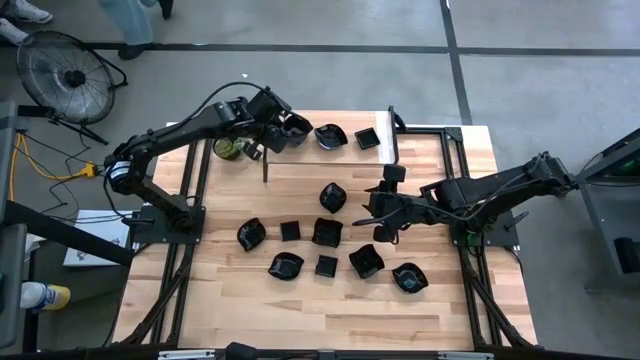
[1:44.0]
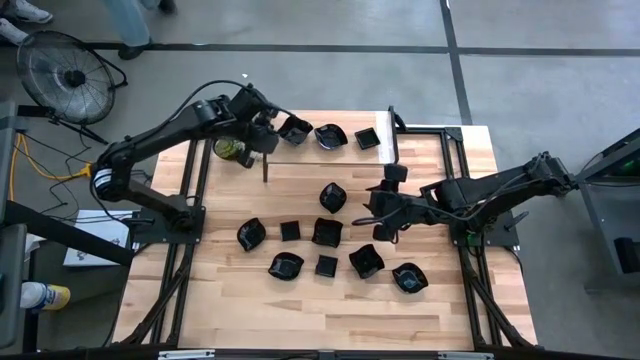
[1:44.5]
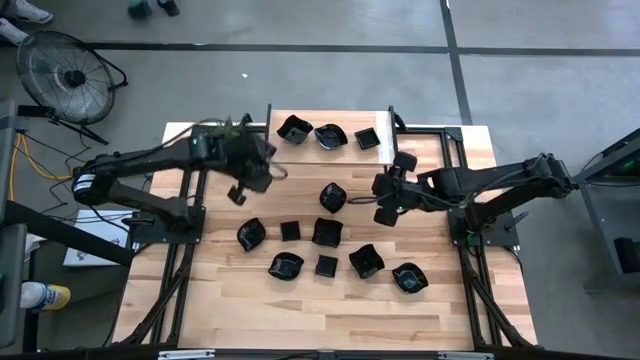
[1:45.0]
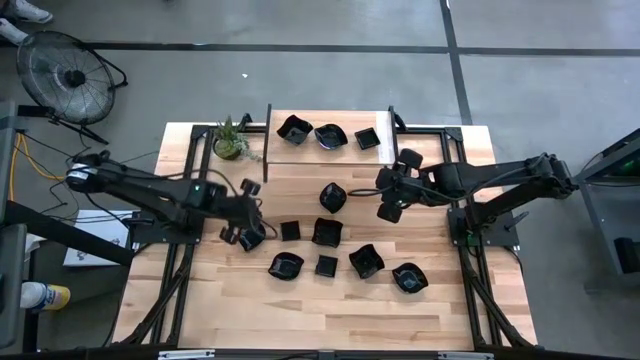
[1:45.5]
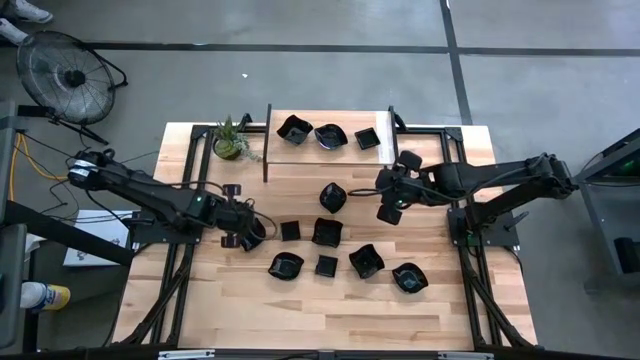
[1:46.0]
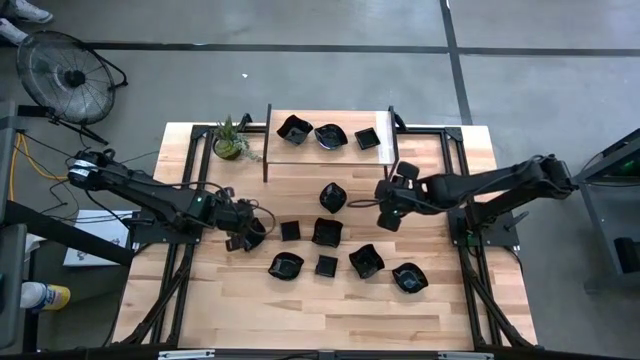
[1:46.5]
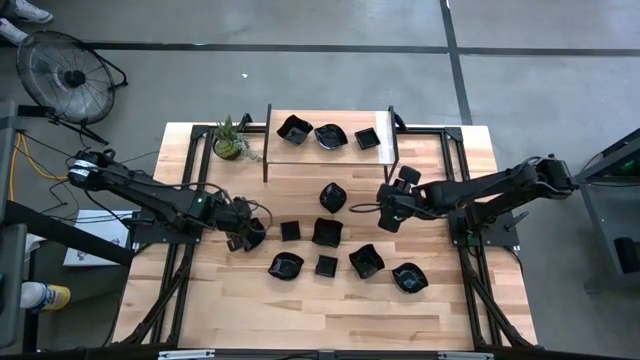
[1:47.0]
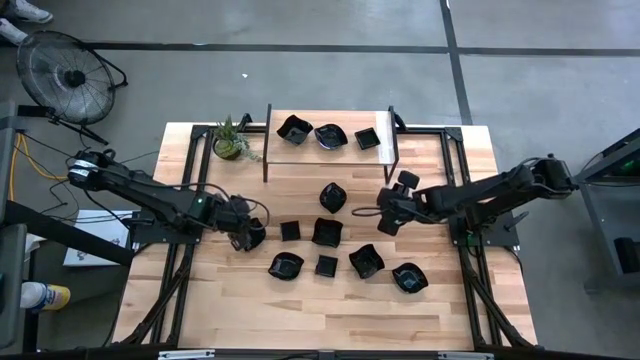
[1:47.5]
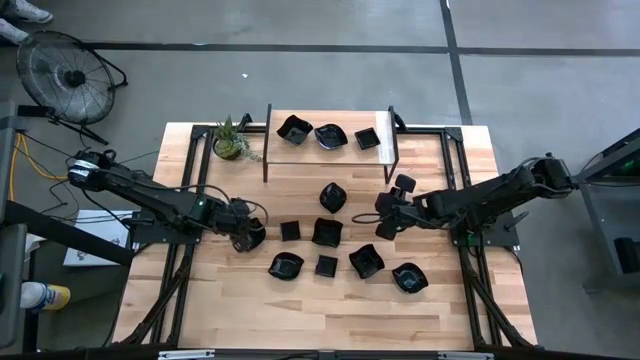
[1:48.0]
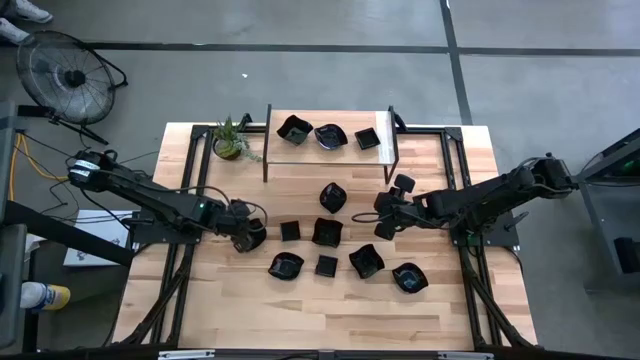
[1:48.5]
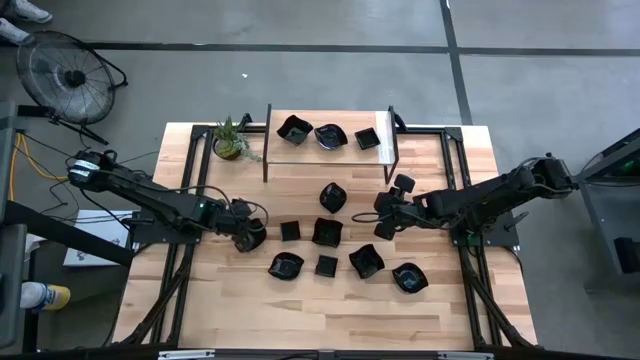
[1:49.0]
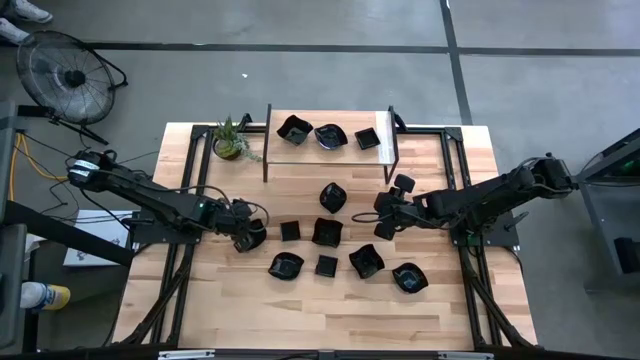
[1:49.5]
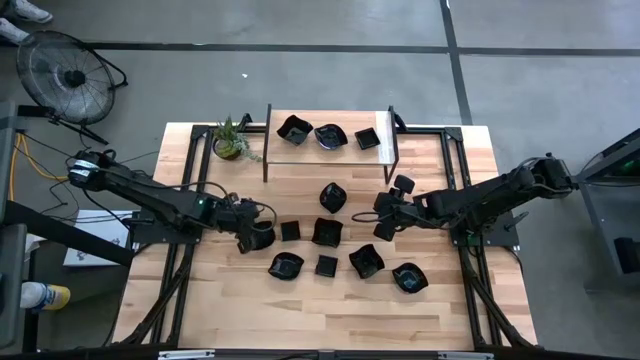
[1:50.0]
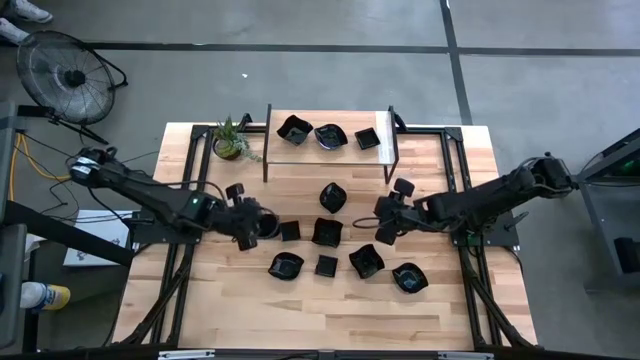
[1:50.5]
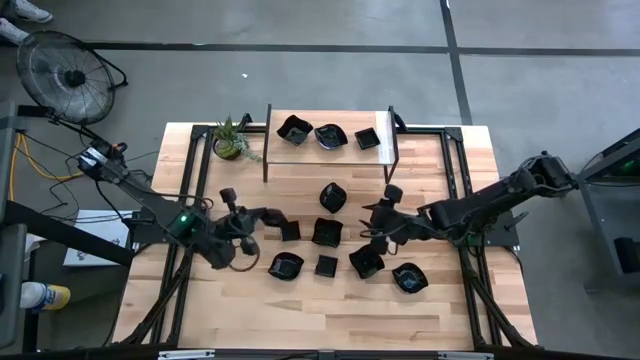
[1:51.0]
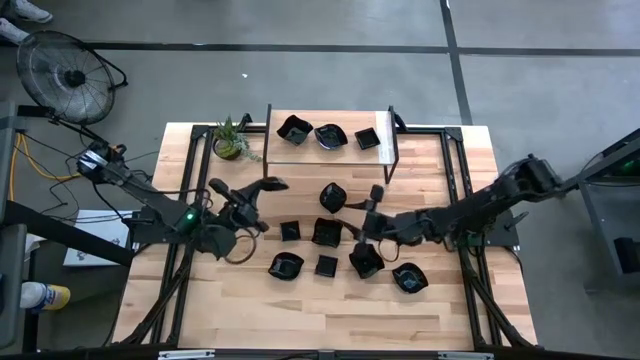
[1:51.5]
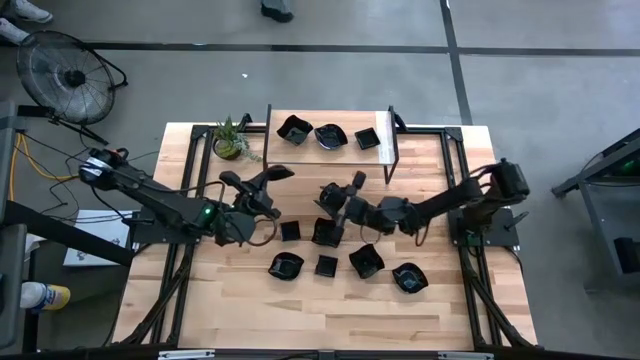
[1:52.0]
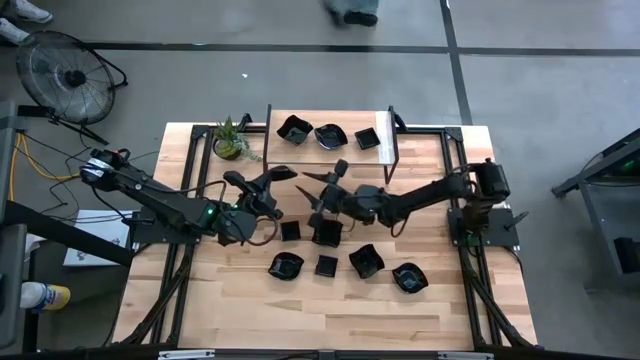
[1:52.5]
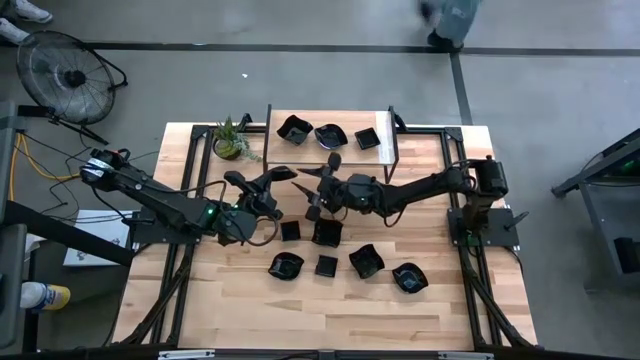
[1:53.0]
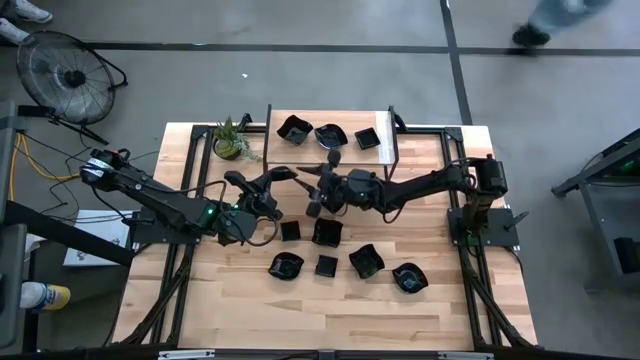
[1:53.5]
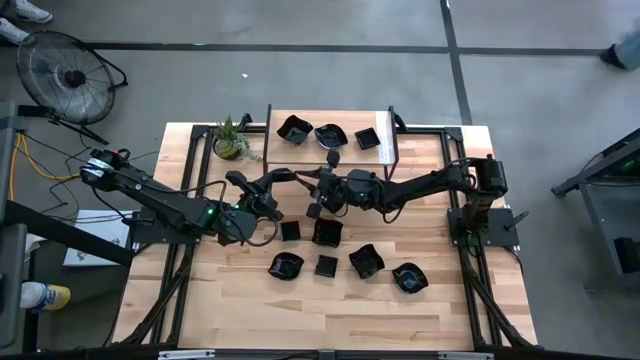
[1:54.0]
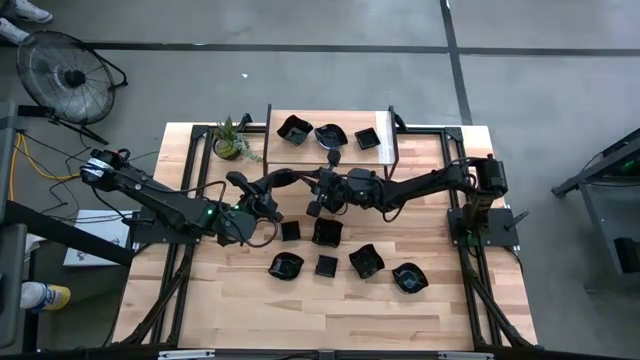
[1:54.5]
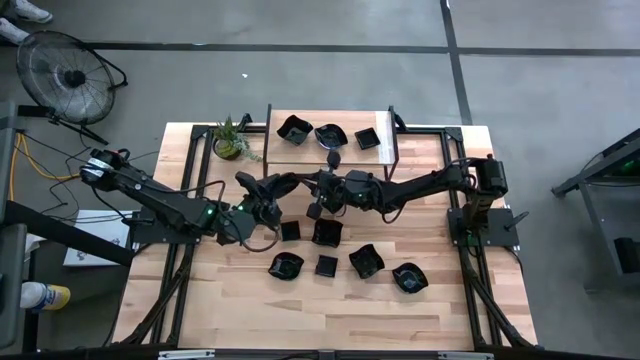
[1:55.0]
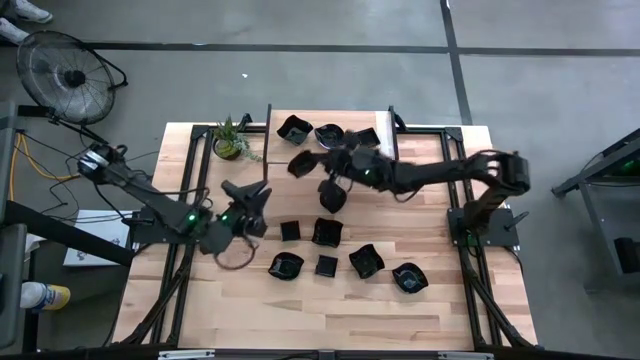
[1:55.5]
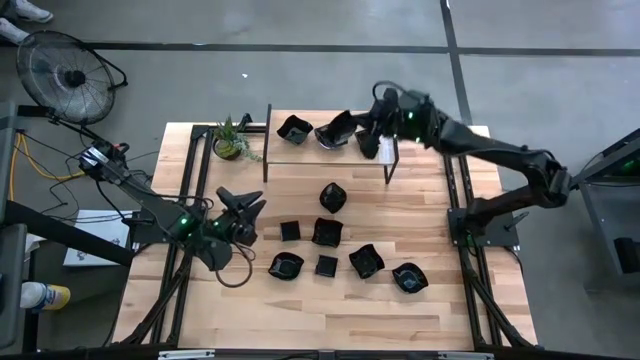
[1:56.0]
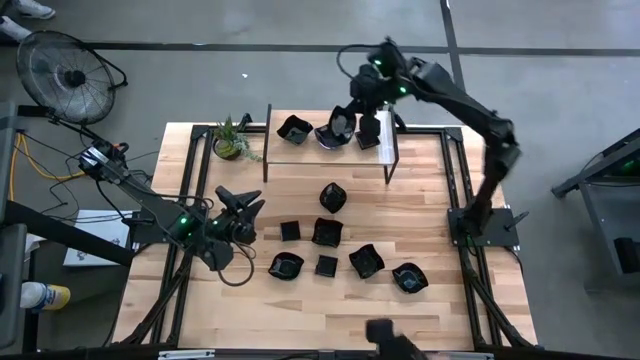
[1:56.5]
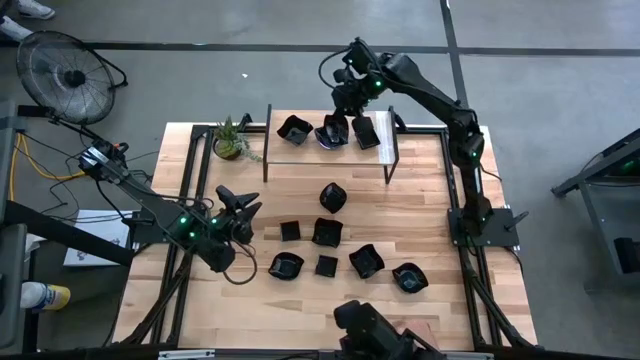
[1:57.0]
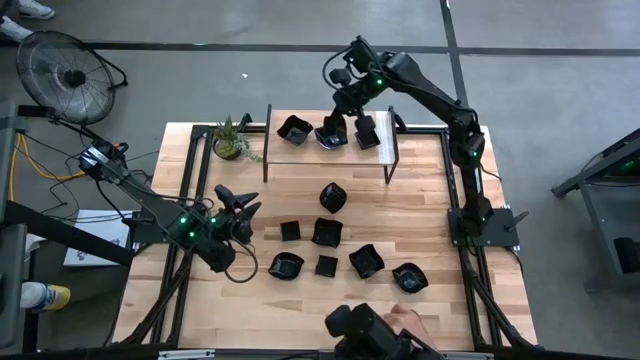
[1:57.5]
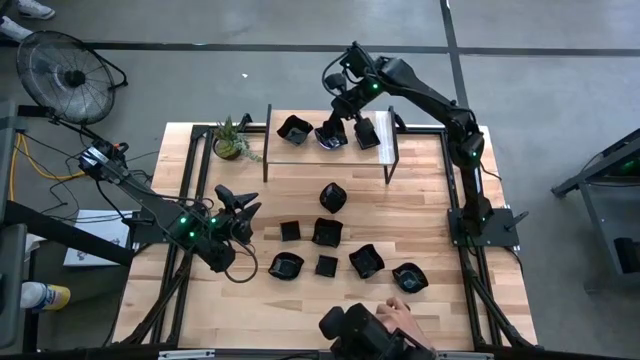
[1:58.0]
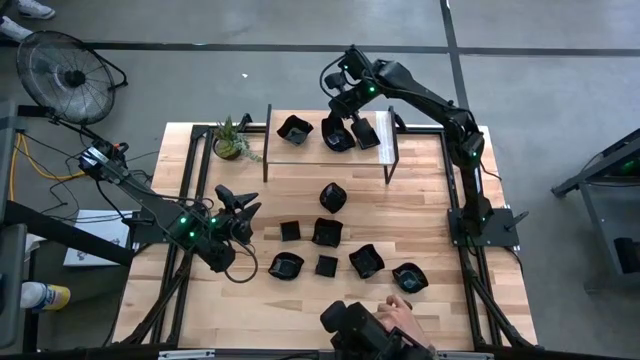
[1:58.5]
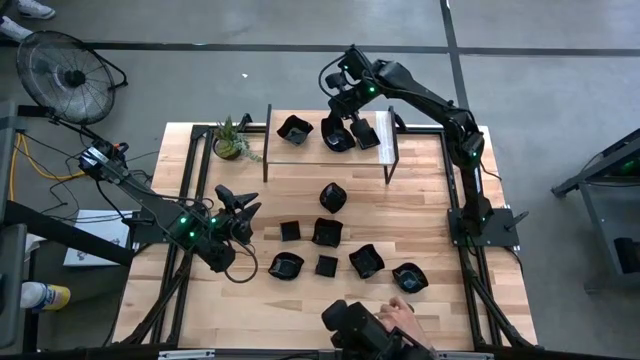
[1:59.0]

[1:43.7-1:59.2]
Task: Pick & Place Mini shaped plates
Stack the black leaf-shaped plate on top of the black leaf-shaped plate on the shelf

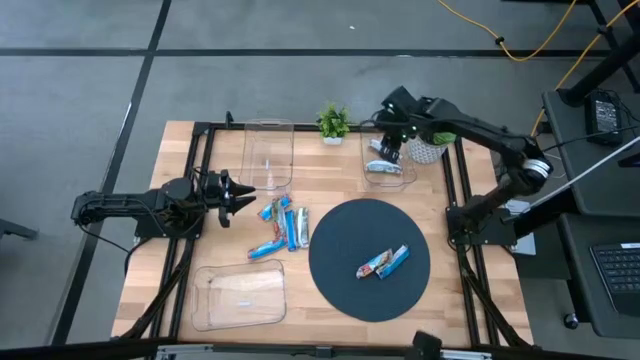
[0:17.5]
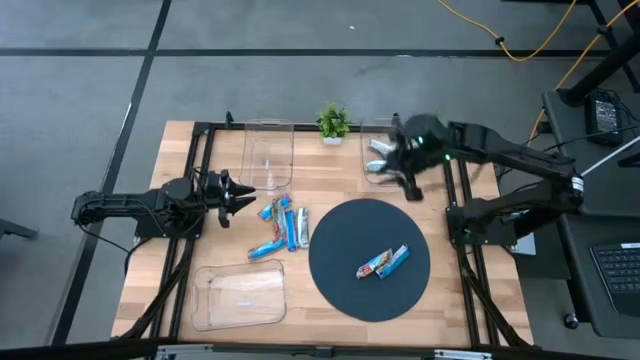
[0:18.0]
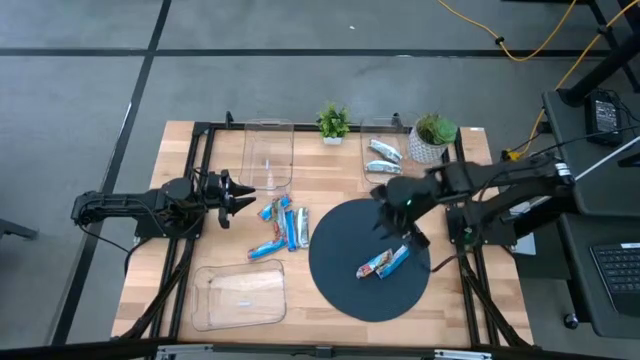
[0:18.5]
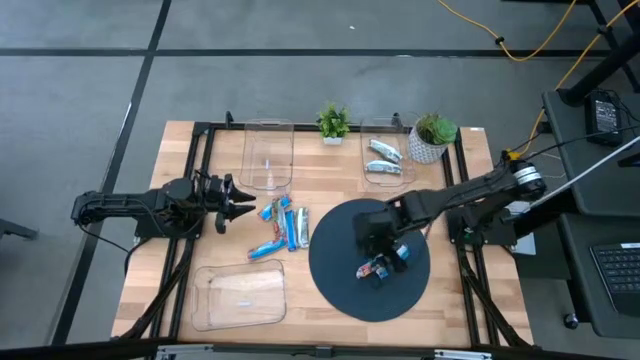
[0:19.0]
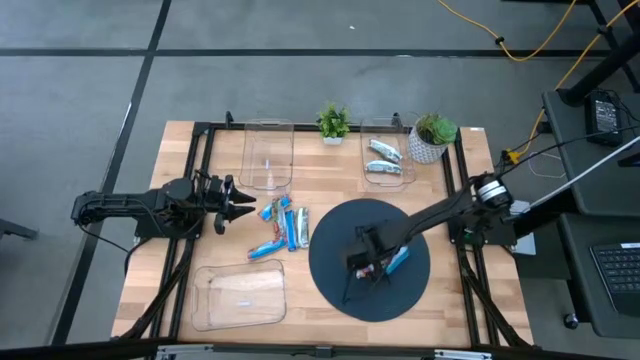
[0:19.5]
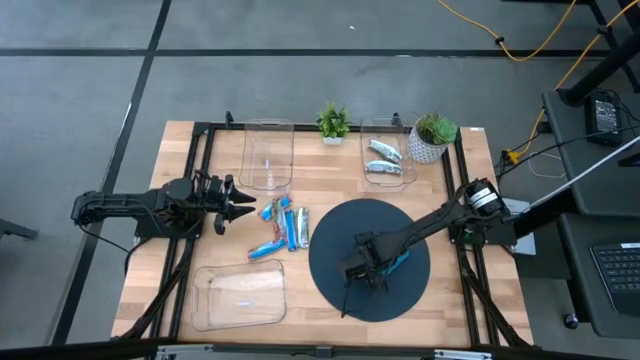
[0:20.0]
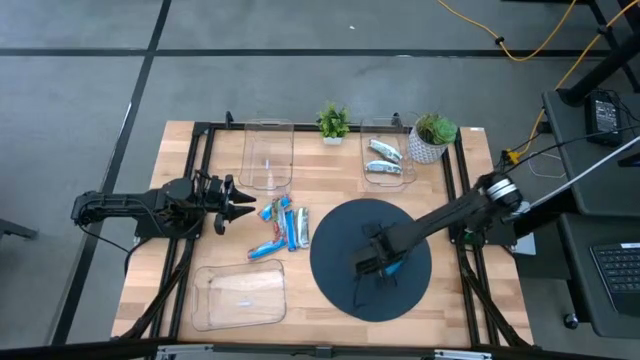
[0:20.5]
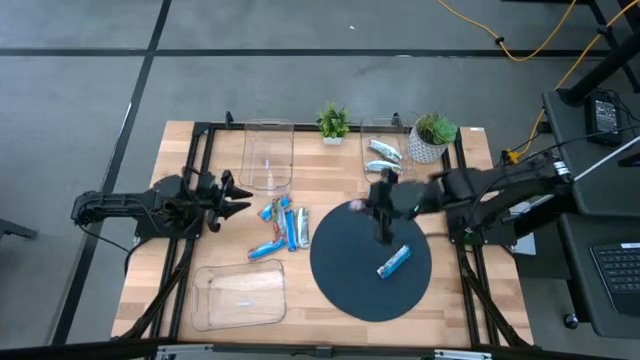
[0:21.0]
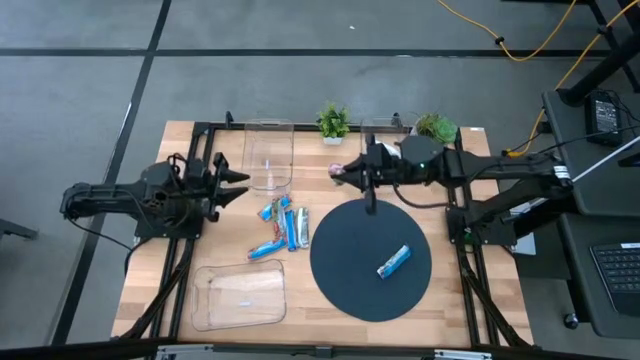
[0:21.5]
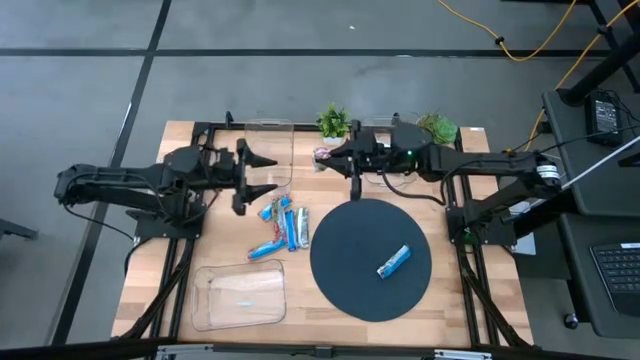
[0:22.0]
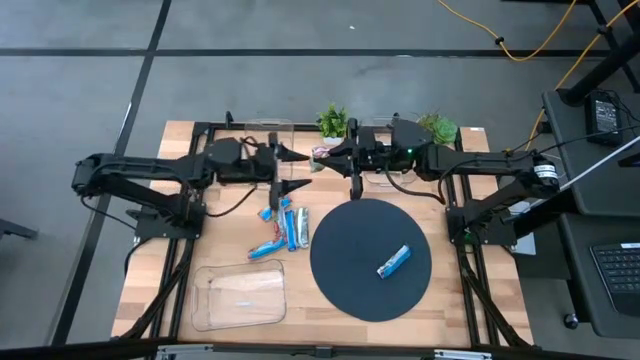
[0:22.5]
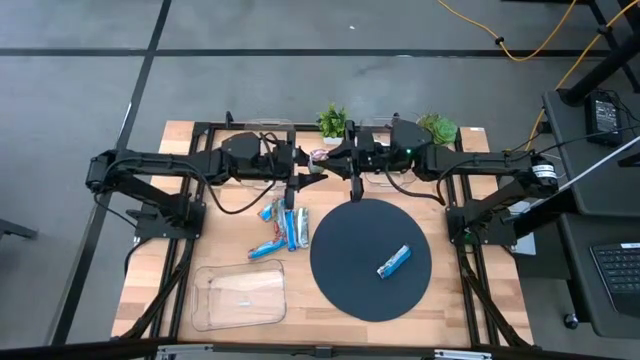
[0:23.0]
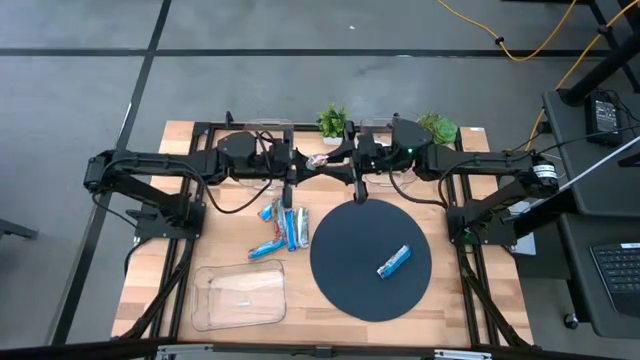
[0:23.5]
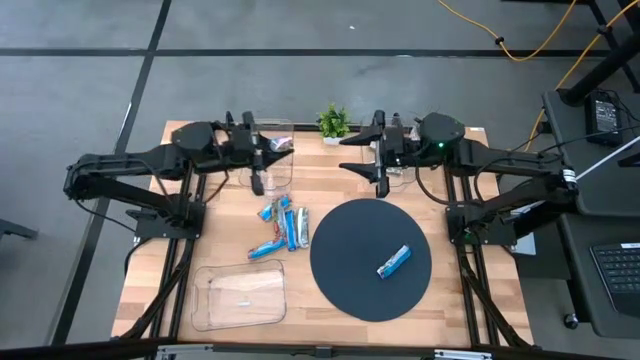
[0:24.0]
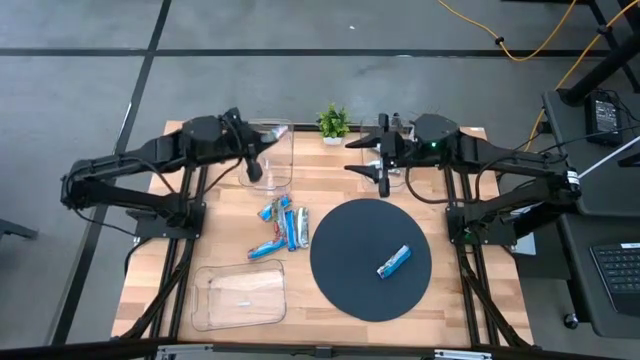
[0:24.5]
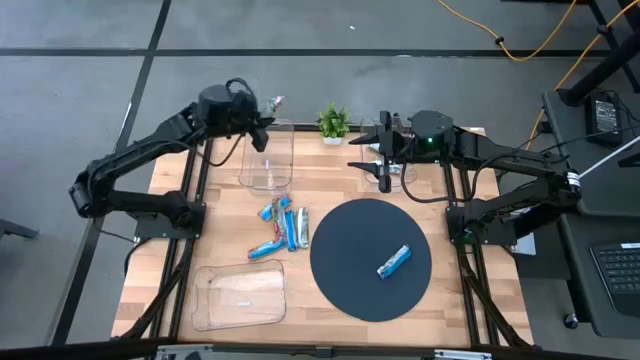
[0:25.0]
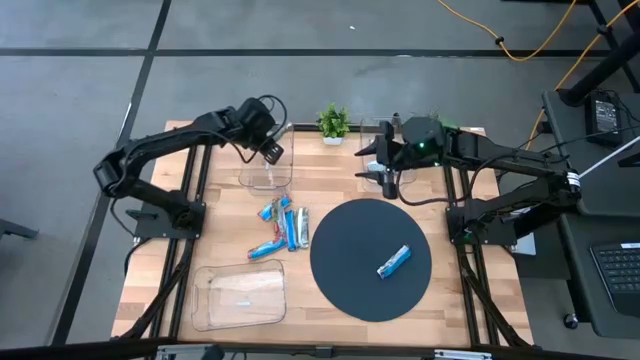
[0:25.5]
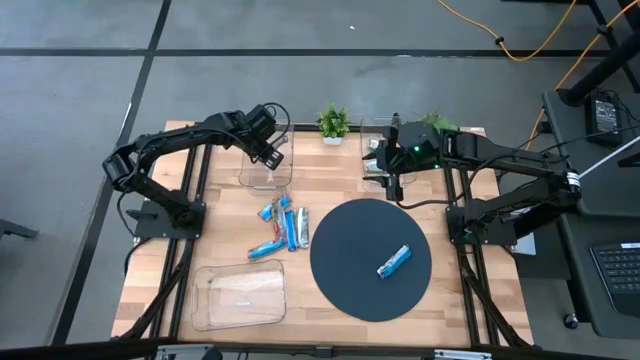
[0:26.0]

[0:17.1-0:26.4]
Task: Pick and place Granola Bars by type
Put the red granola bar into the top left transparent bin
